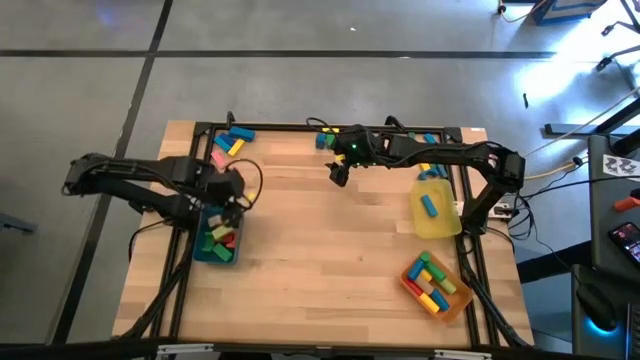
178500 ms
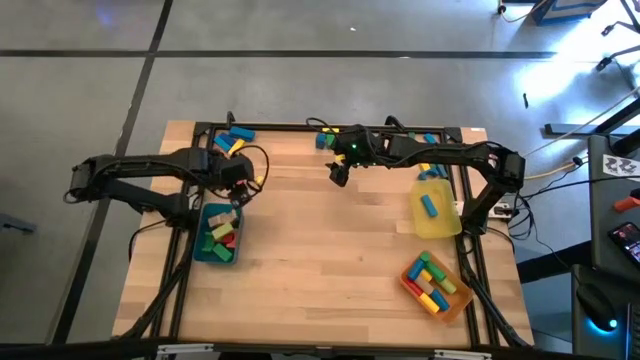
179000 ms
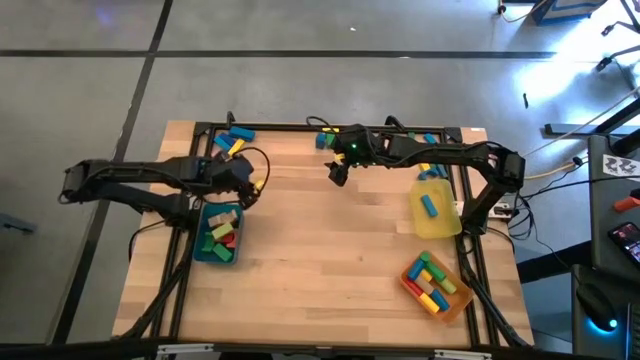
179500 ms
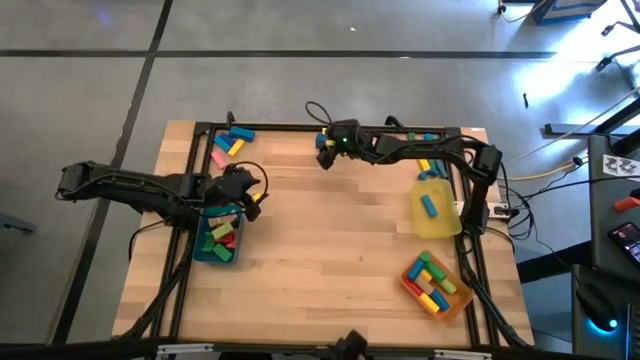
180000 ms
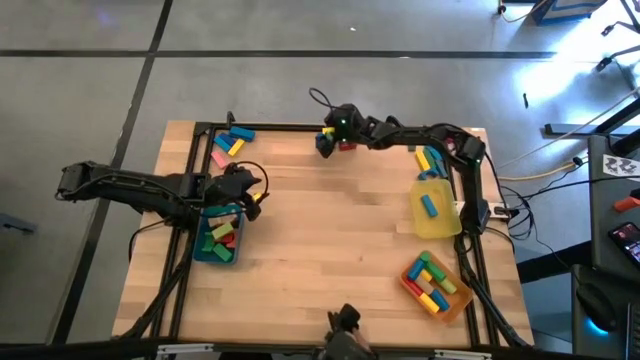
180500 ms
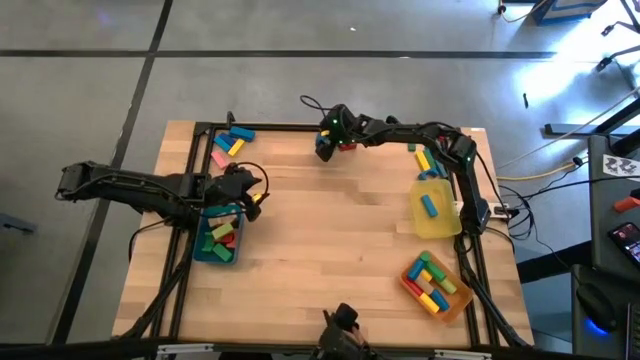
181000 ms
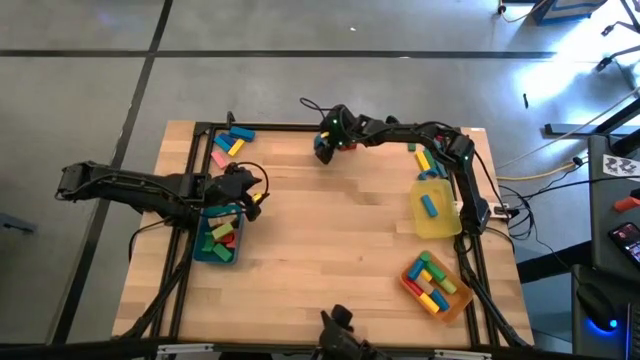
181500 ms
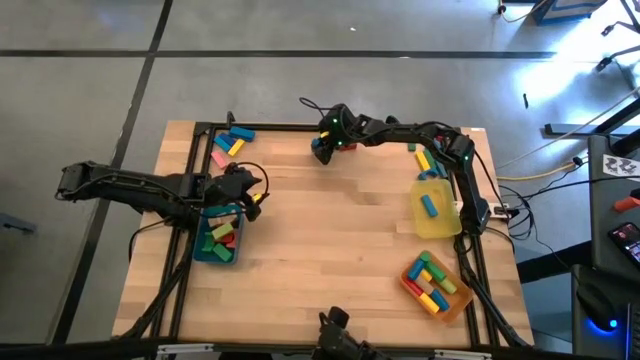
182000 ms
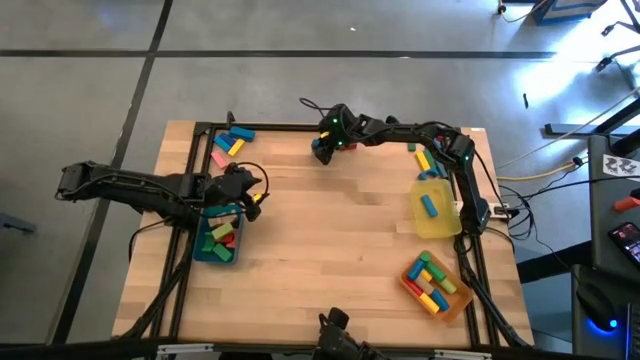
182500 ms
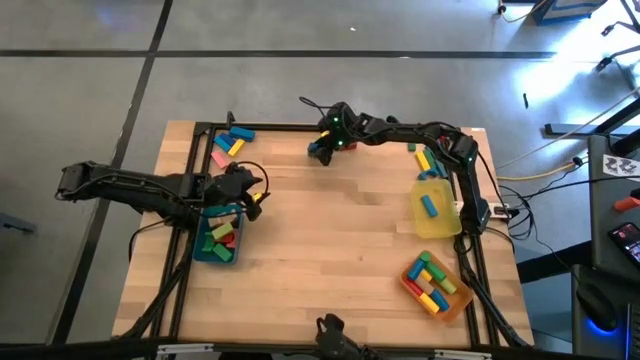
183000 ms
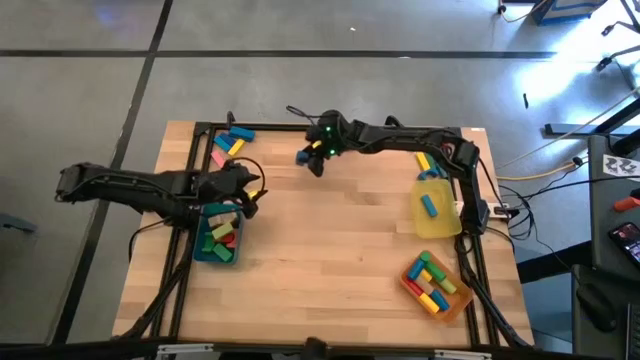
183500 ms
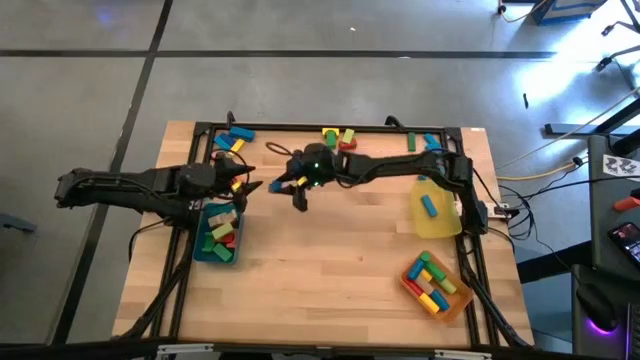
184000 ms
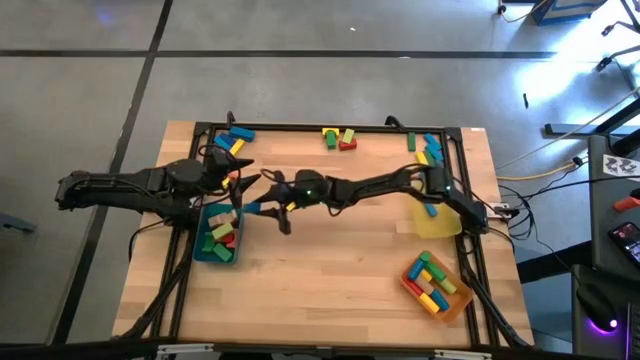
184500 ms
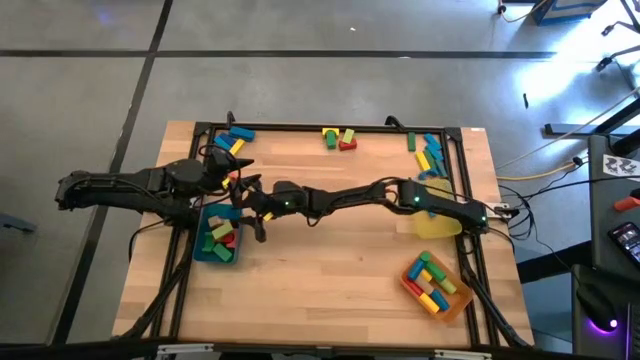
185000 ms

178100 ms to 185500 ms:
Task: Sort blocks by size
Put the blue arch block into the blue bin

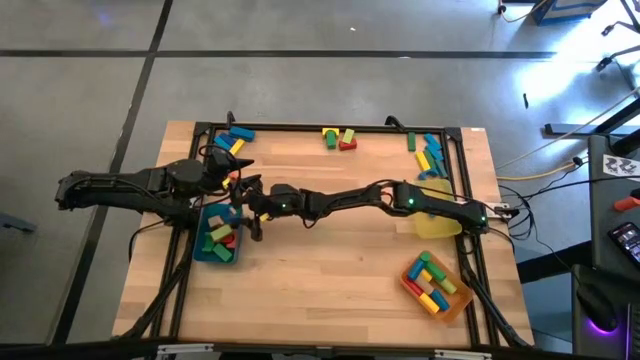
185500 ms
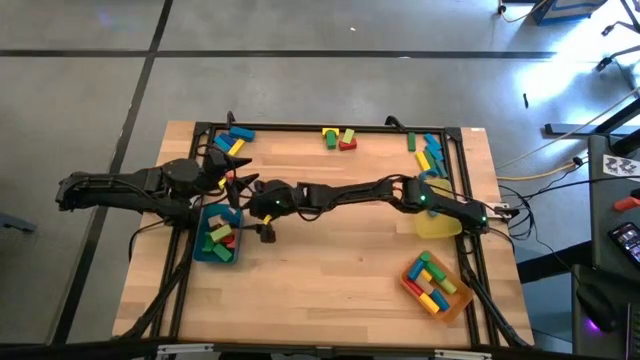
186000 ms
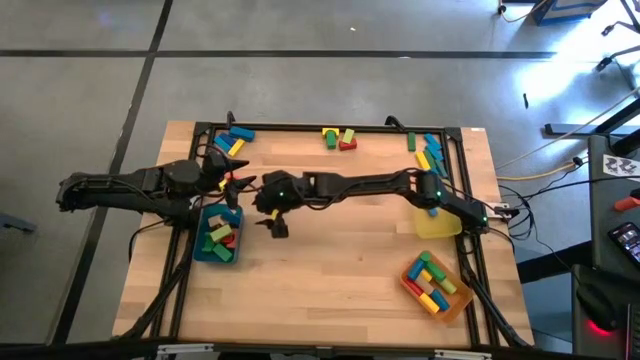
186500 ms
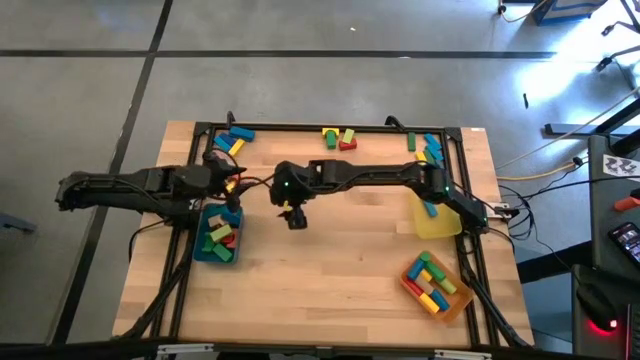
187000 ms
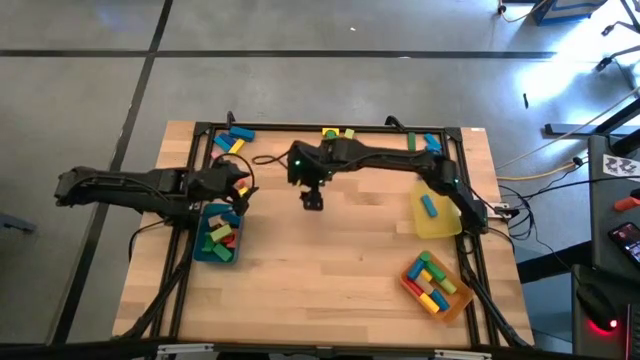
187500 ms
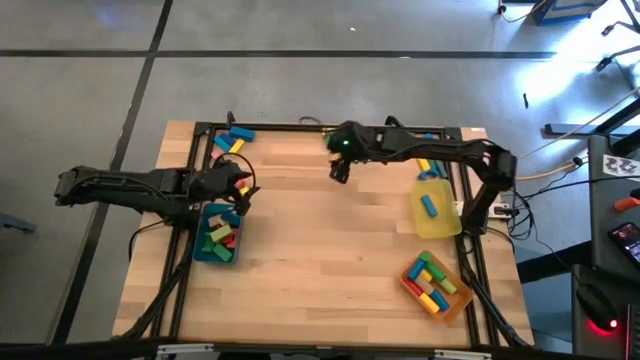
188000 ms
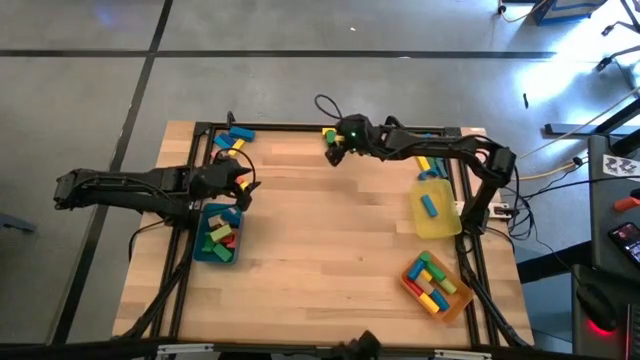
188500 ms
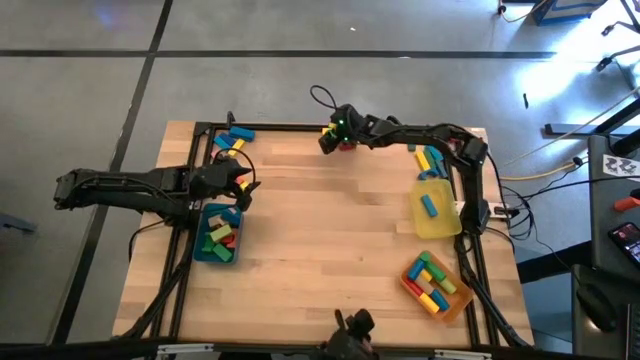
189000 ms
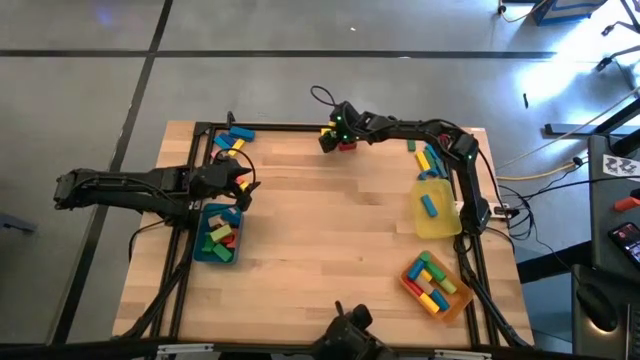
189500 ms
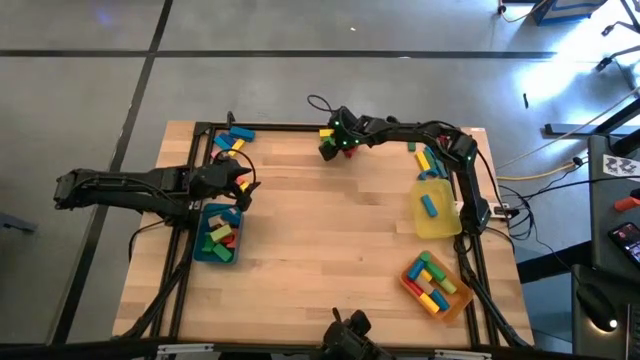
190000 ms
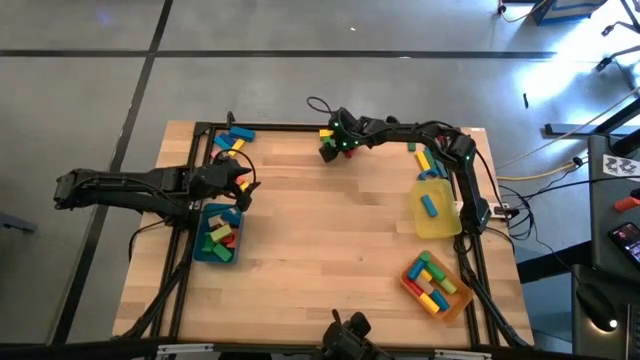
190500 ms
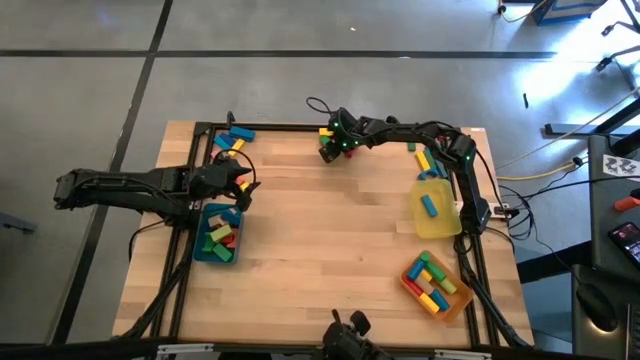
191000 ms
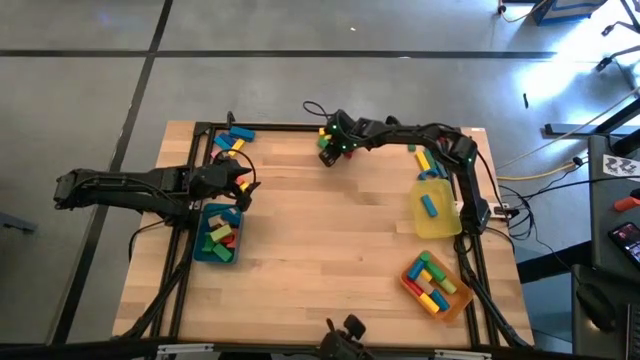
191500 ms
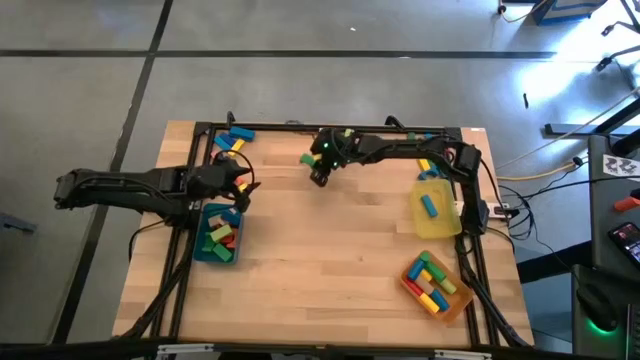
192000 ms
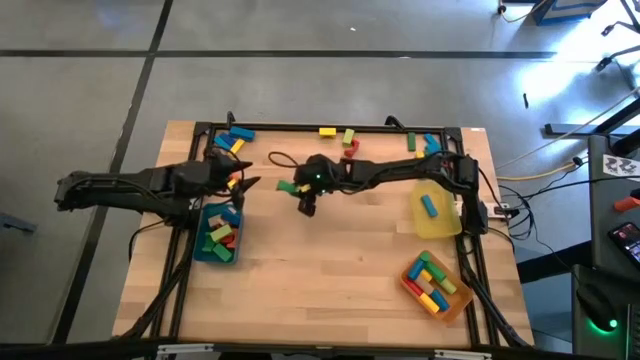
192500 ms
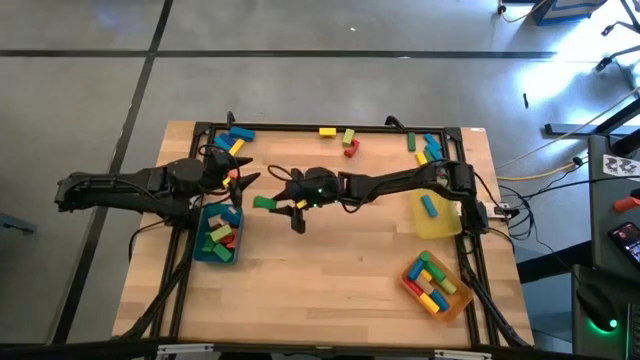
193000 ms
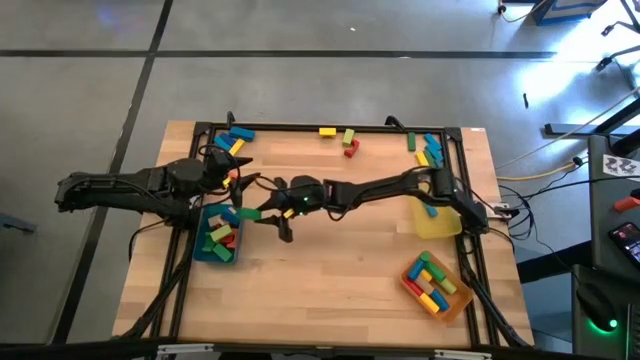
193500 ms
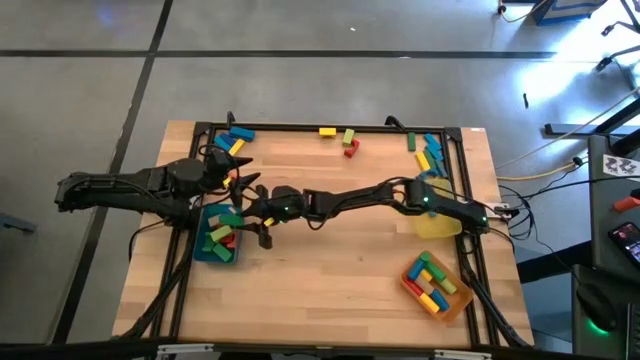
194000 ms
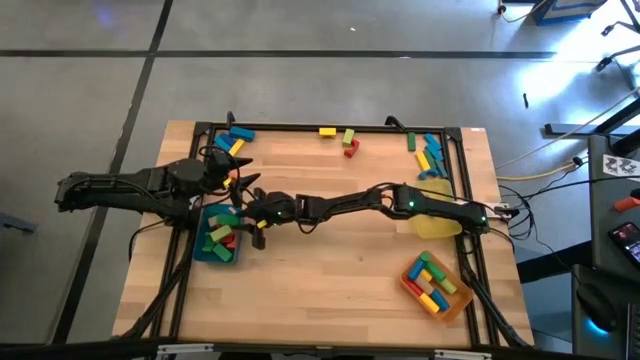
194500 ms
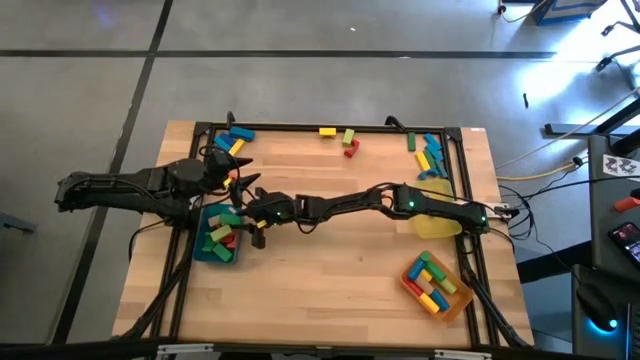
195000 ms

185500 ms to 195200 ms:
Put the green arch block into the blue bin

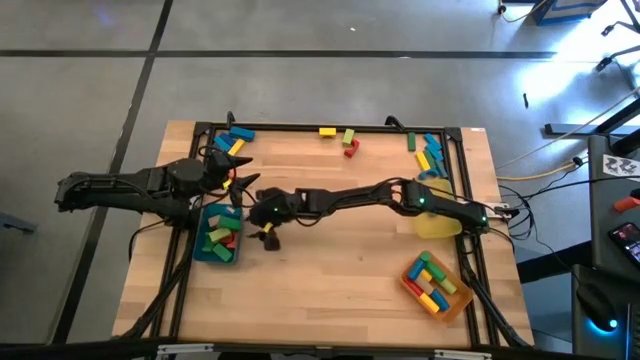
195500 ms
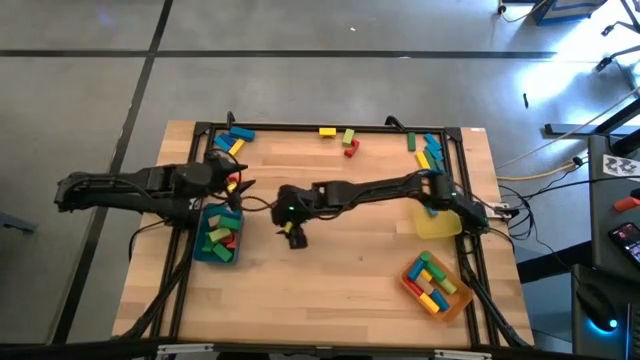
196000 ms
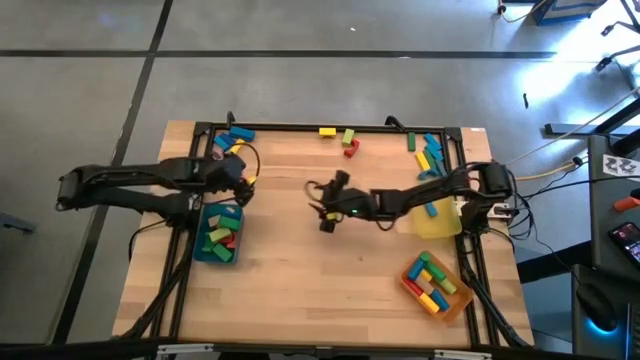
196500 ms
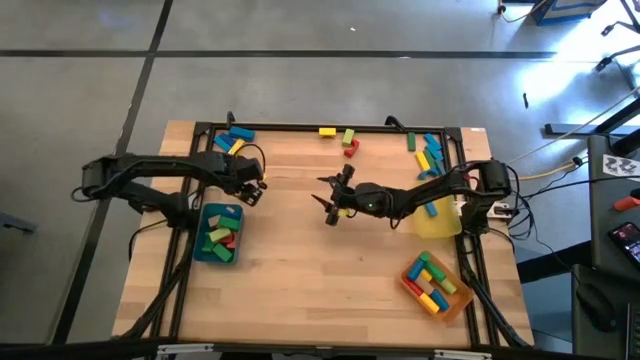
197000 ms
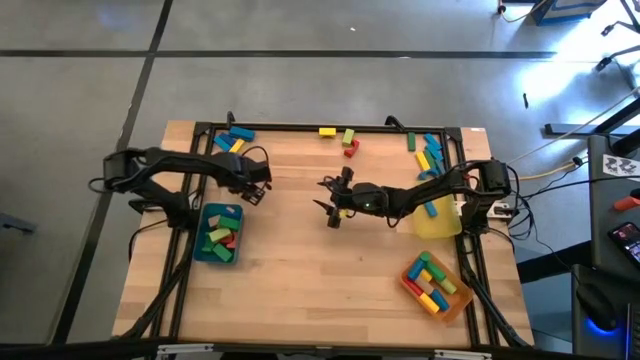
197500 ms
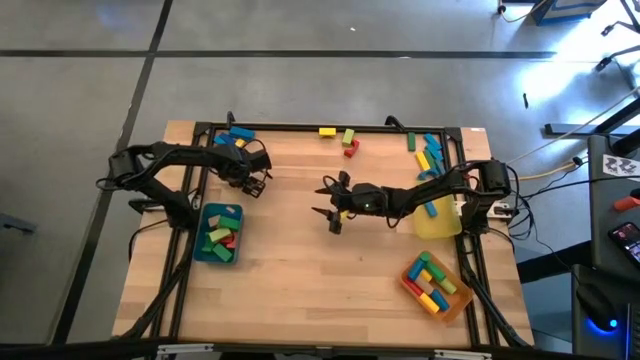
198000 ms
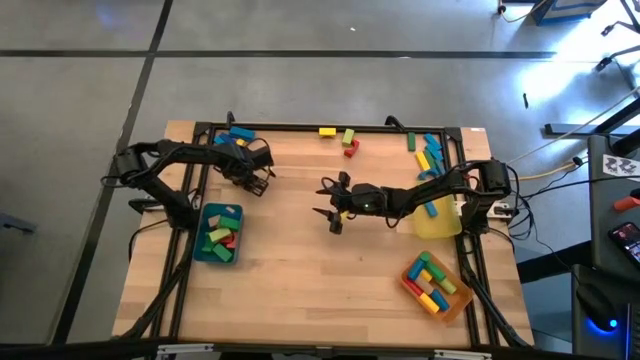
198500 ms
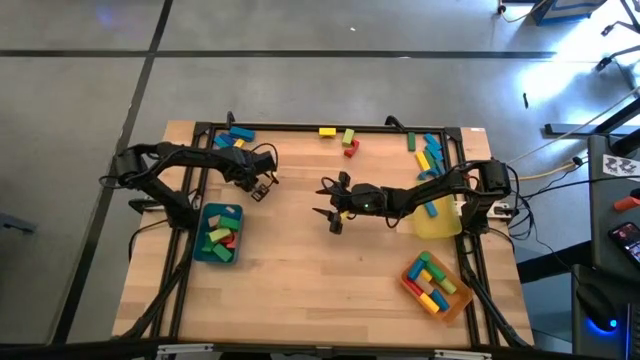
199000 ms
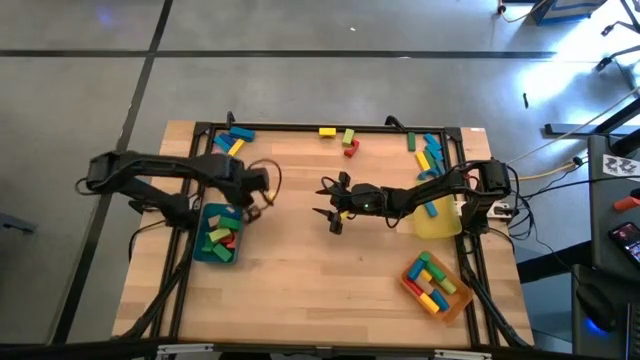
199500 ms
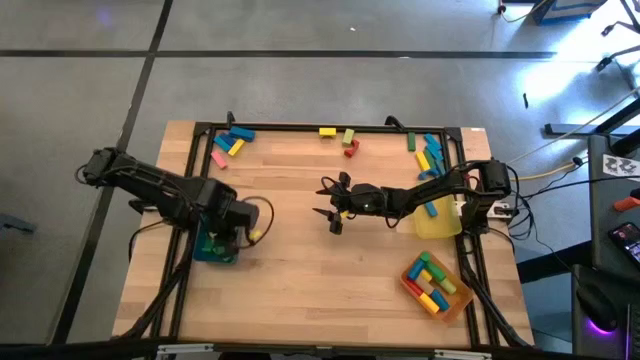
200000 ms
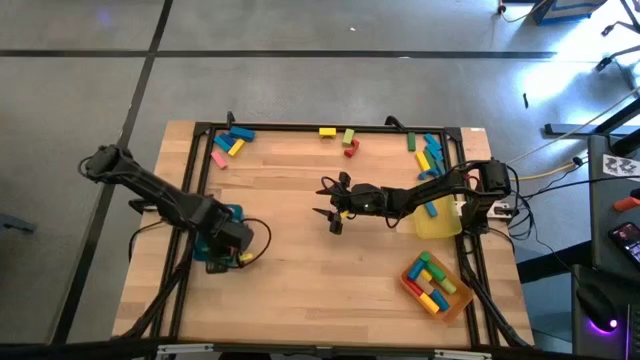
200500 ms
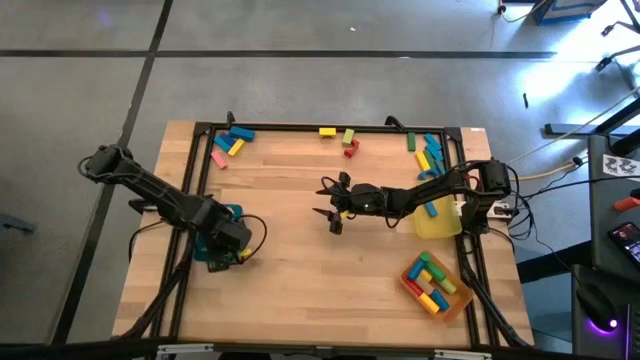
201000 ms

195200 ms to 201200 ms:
Put the orange arch block into the blue bin
